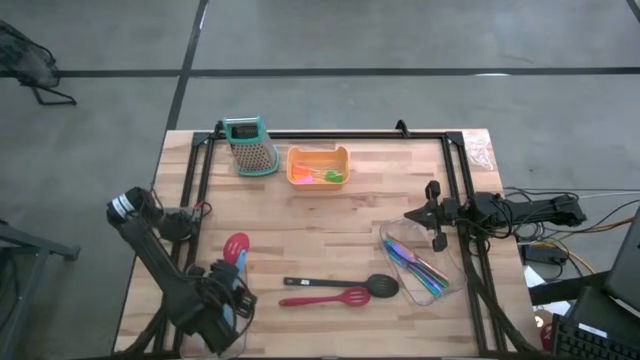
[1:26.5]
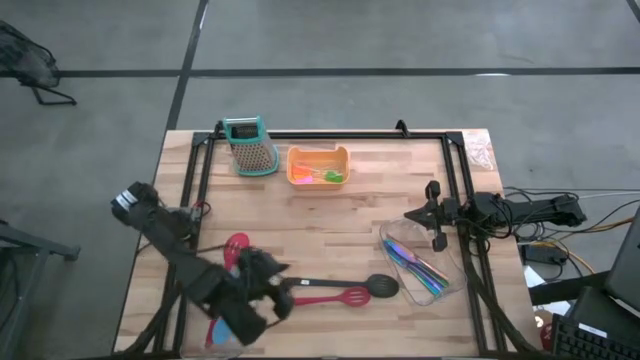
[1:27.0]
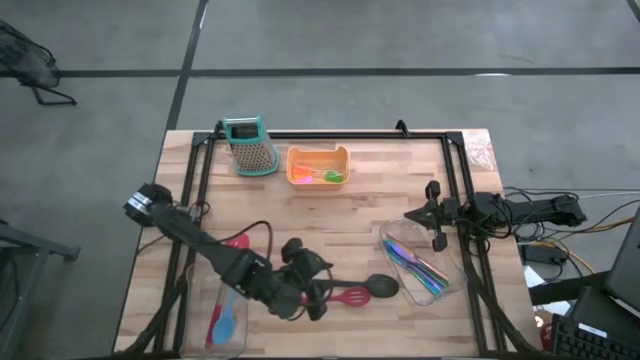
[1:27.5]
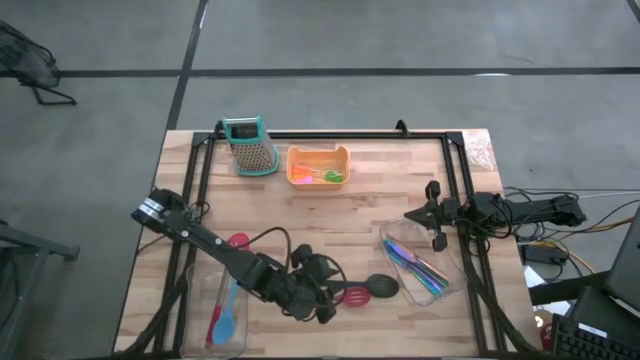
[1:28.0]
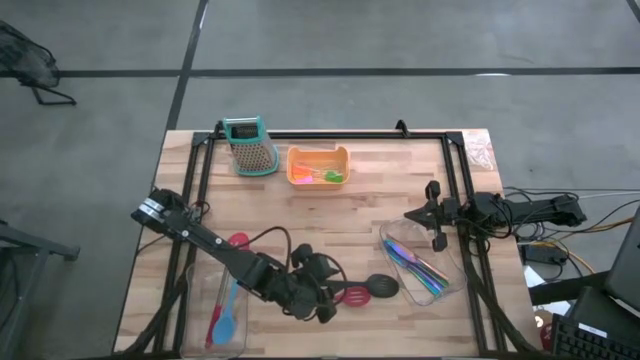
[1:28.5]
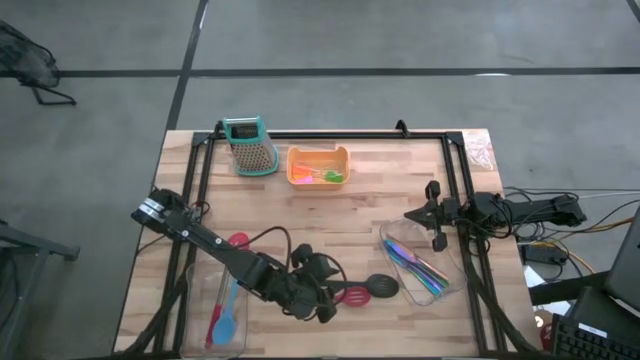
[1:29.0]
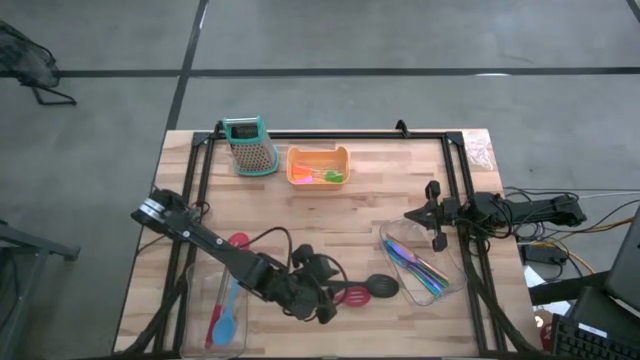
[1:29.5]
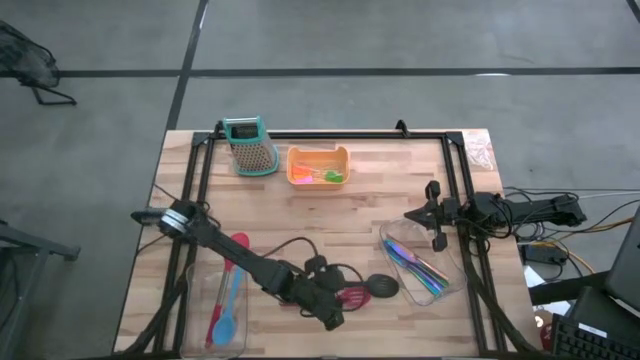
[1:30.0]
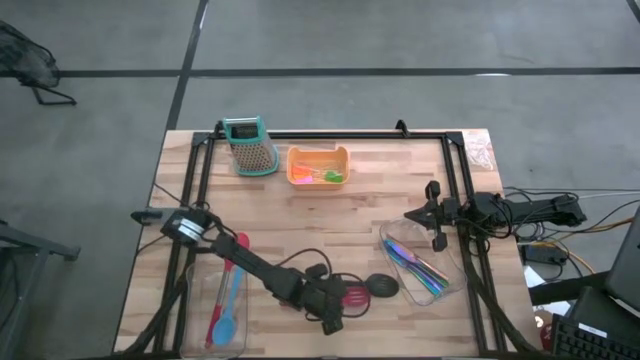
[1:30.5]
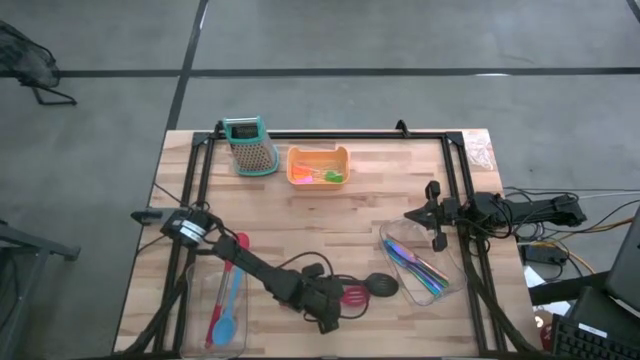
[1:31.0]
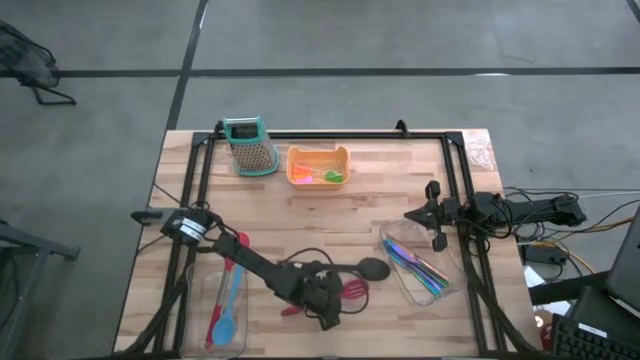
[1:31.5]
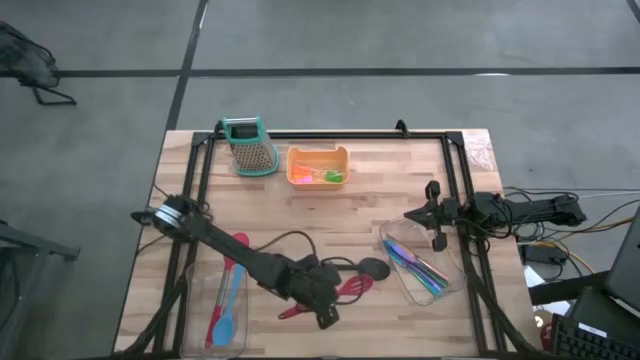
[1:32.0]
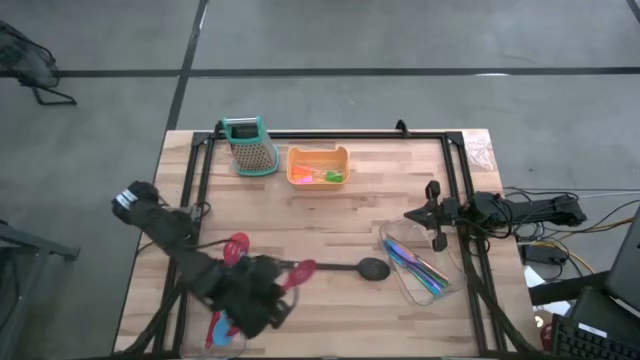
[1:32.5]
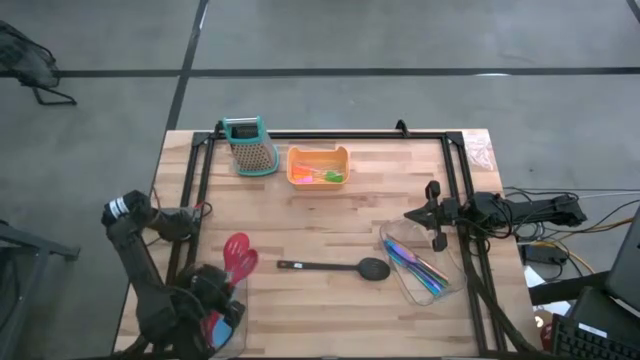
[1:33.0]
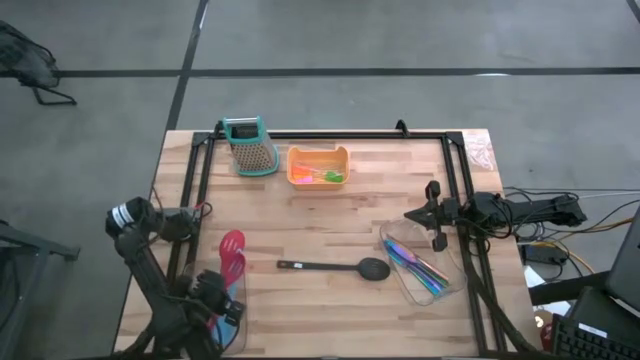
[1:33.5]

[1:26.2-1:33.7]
Task: Pick & Place Kitchen Items
Put the red serving spoon into the bottom transparent bin

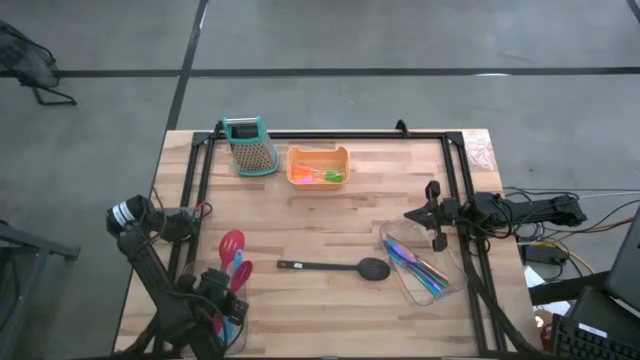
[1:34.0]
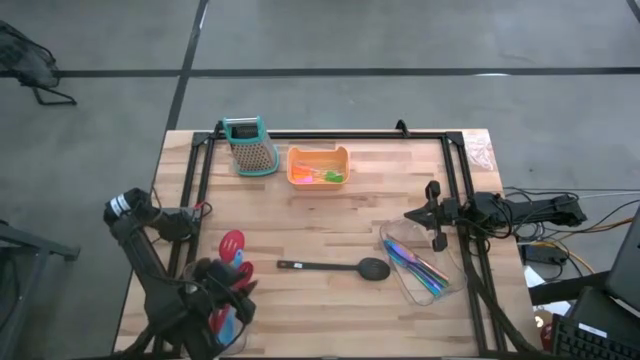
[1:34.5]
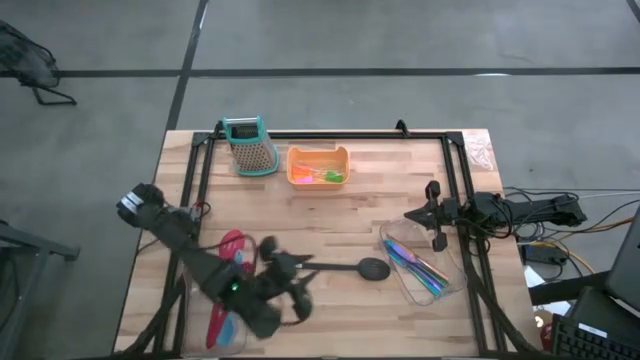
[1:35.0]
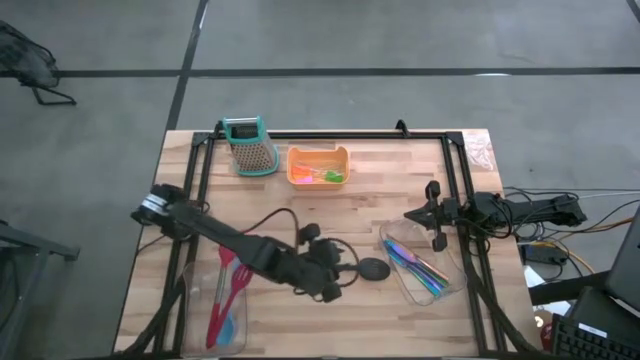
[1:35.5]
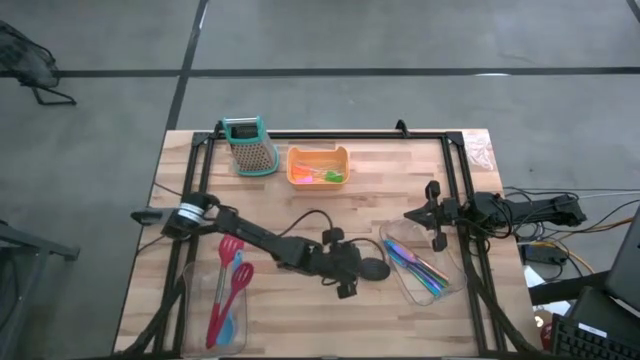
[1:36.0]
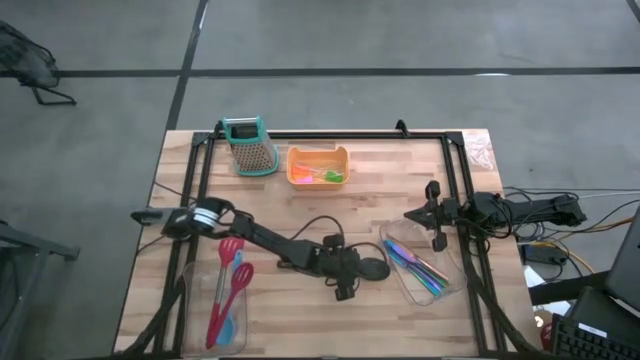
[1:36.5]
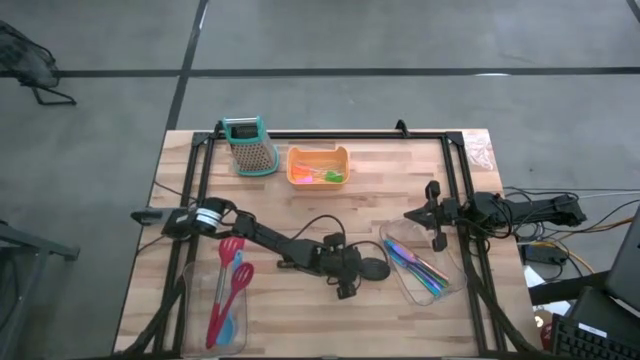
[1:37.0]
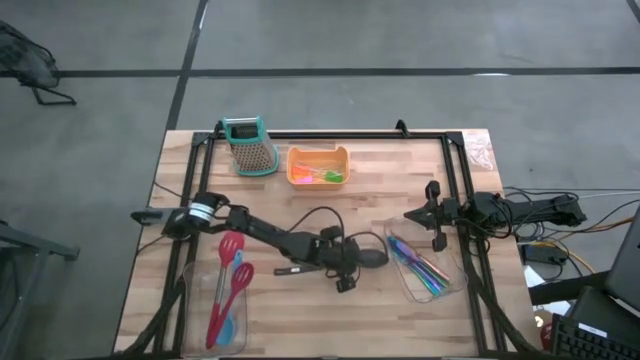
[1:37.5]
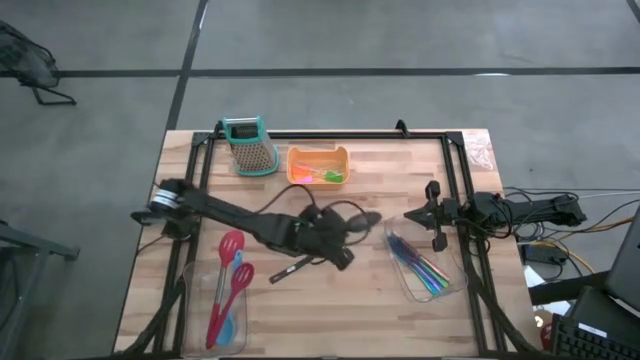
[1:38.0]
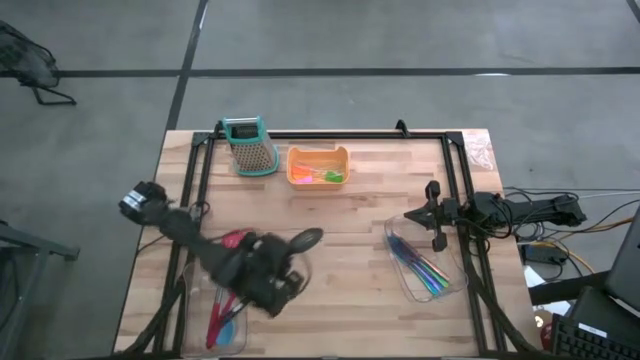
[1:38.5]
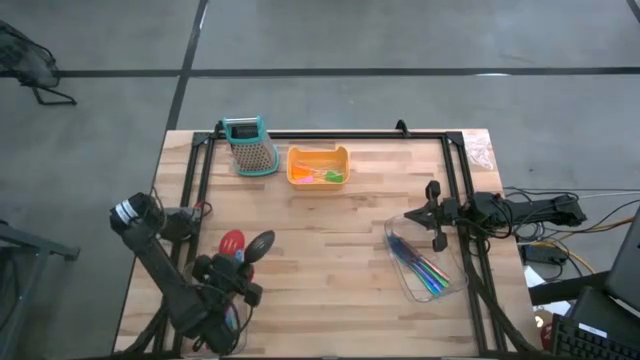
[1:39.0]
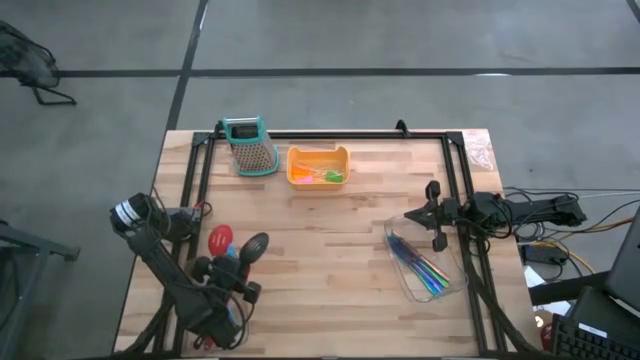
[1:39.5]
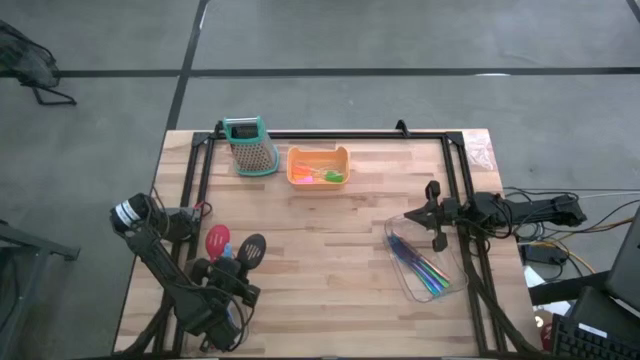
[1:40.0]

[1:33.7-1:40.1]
Put the black serving spoon into the bottom transparent bin

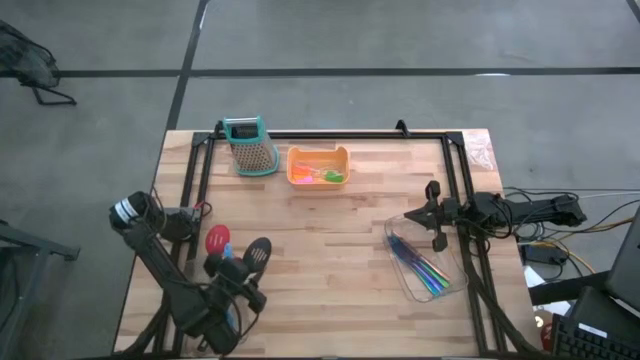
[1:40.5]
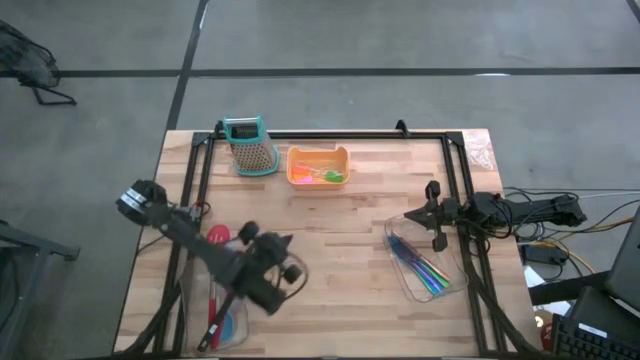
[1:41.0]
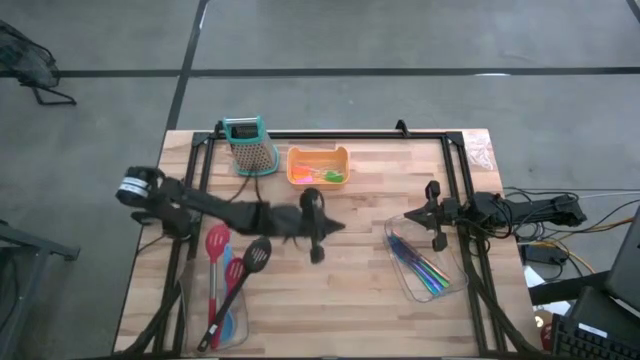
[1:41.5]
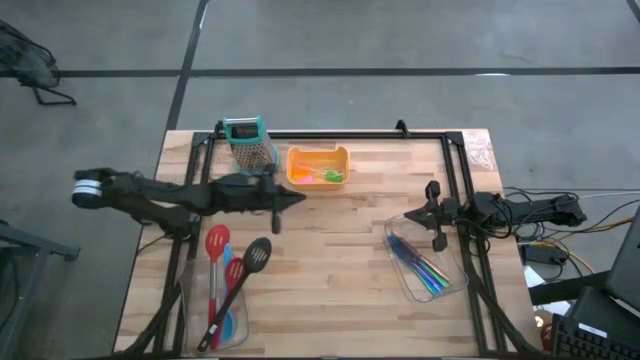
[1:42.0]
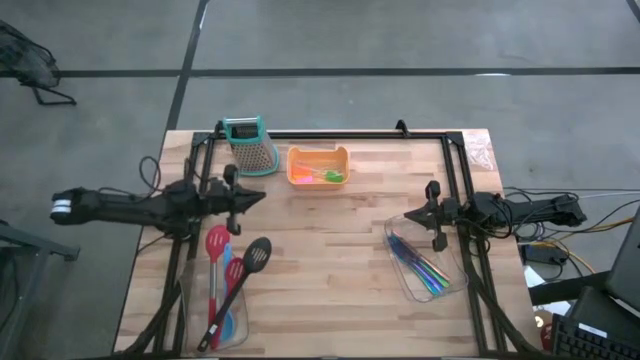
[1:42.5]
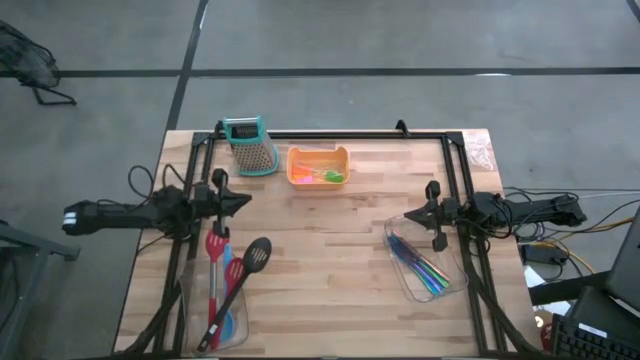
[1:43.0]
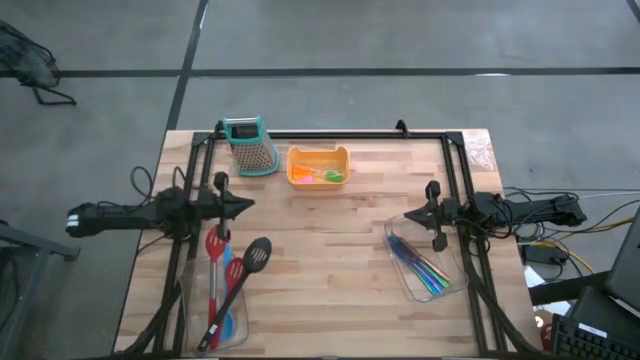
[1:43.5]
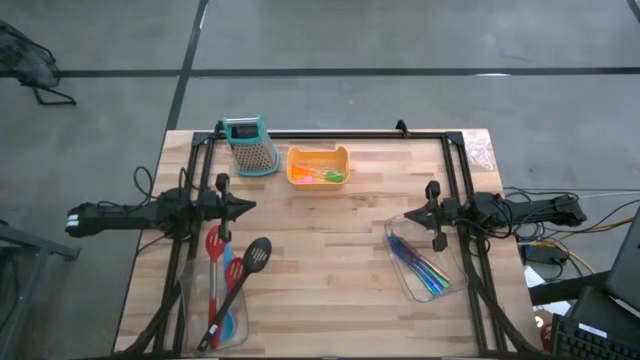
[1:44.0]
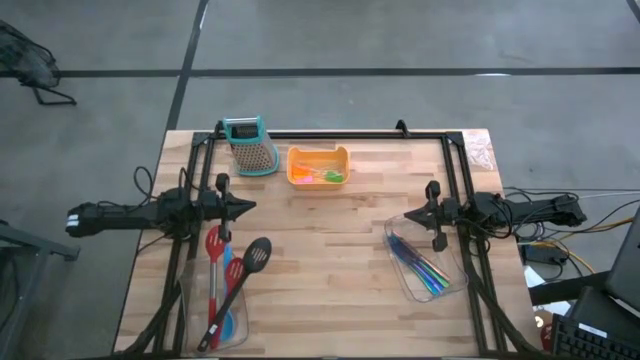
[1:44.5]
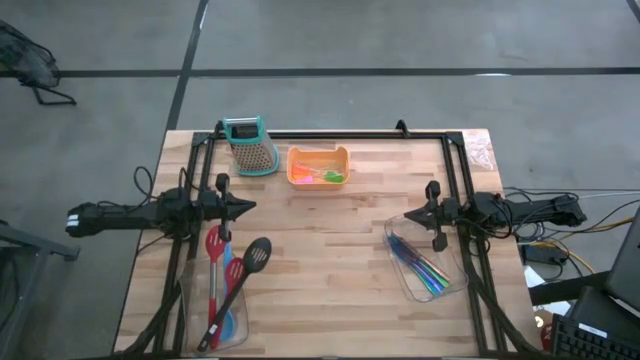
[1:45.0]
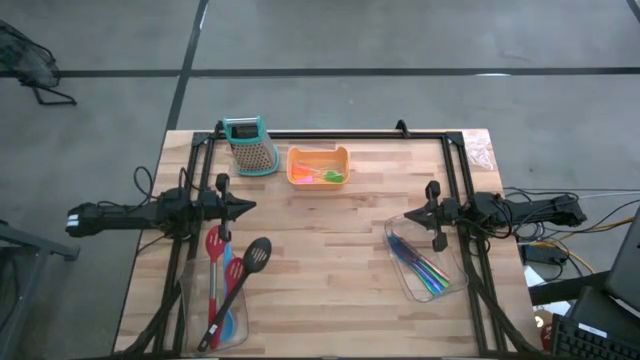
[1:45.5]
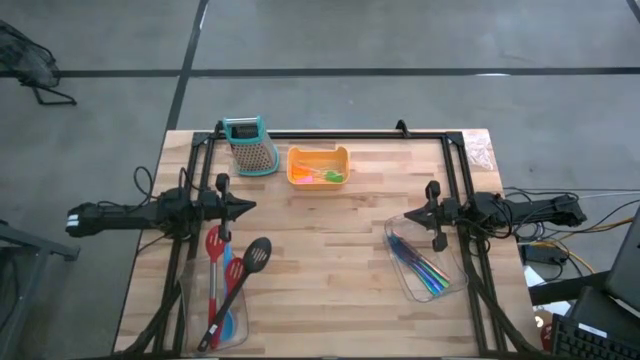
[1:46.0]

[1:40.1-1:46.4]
Return to Home Position

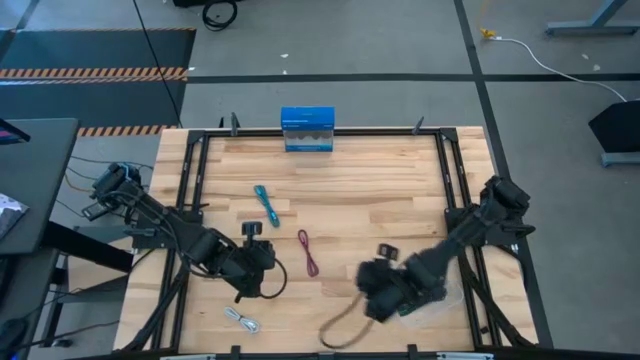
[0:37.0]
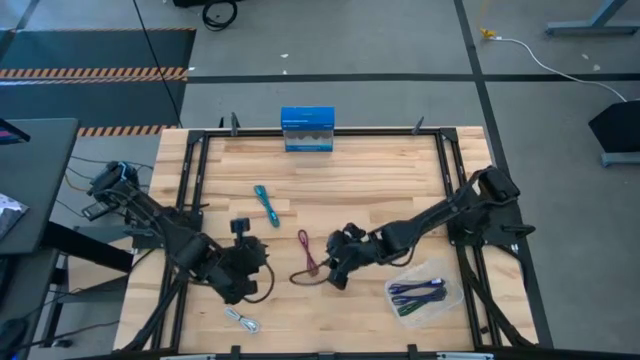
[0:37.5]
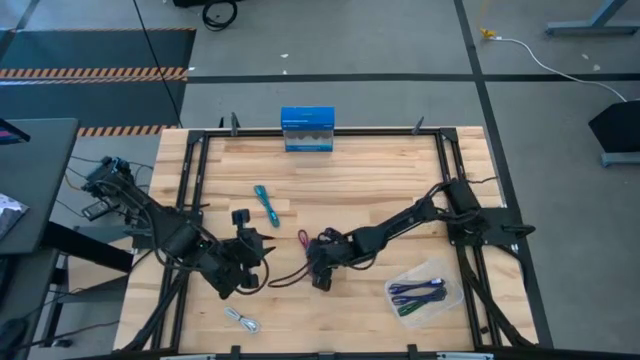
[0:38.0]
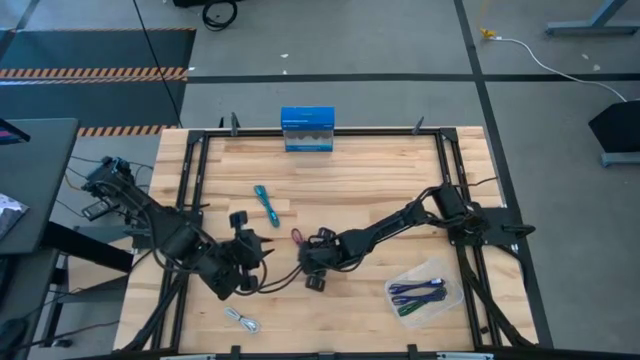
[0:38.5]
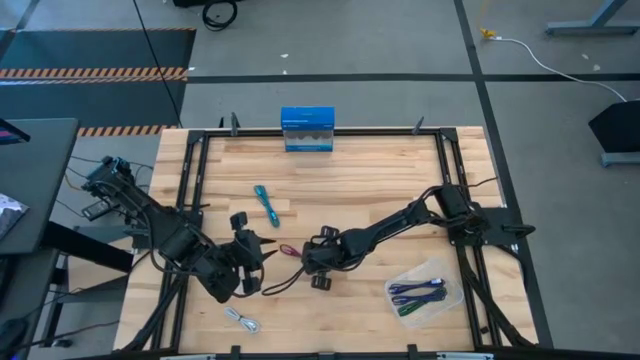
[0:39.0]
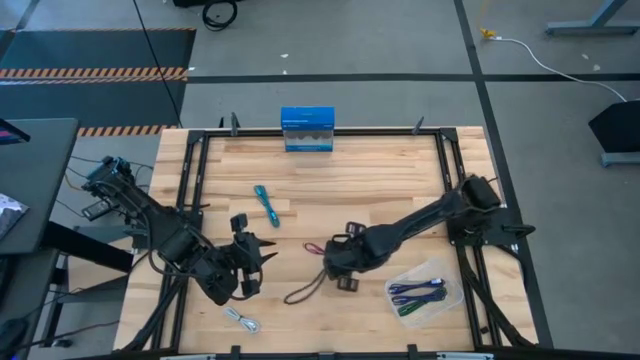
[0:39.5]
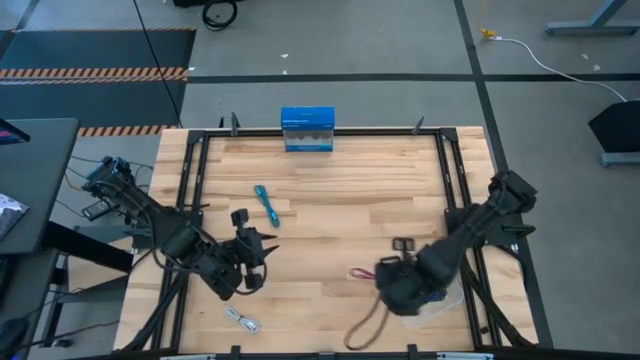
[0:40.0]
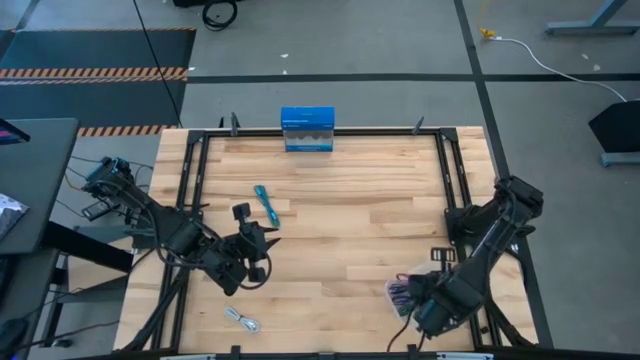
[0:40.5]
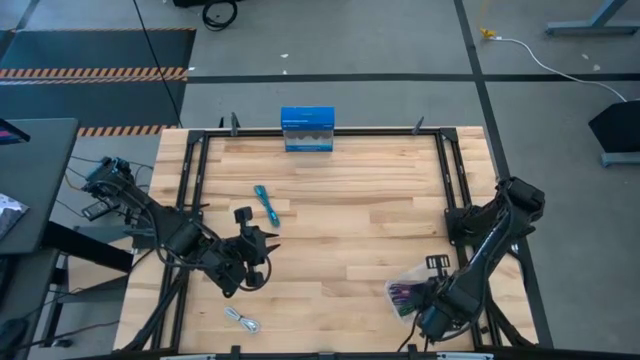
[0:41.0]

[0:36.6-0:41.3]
Task: Pick and place USB-C Cables
Put the pink charger cable into the transparent bin
